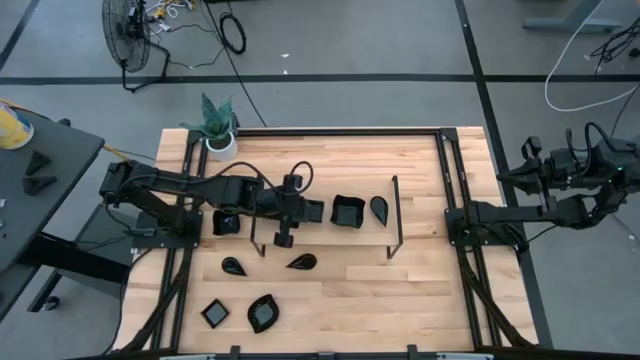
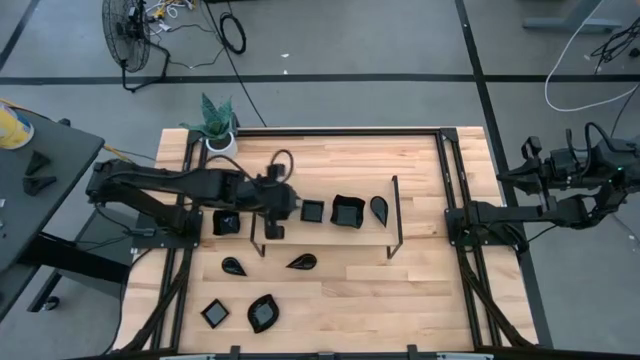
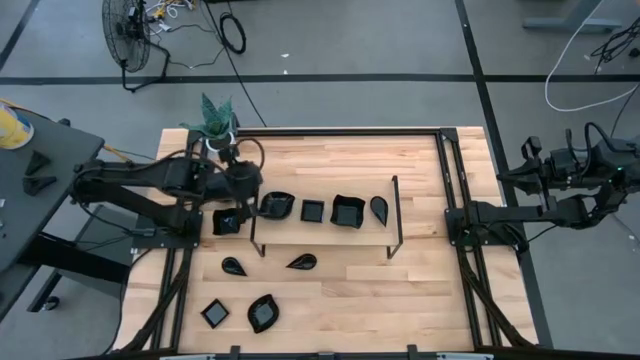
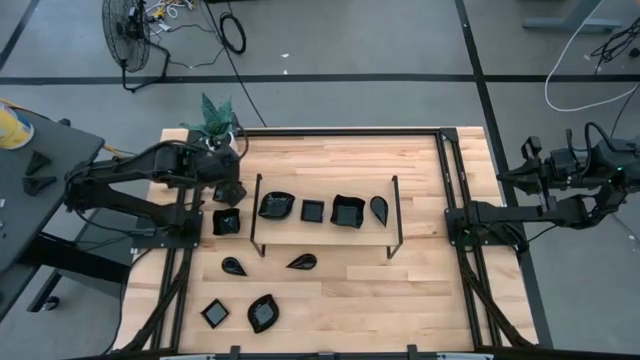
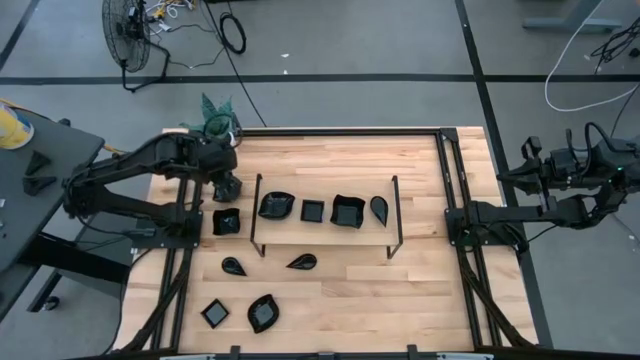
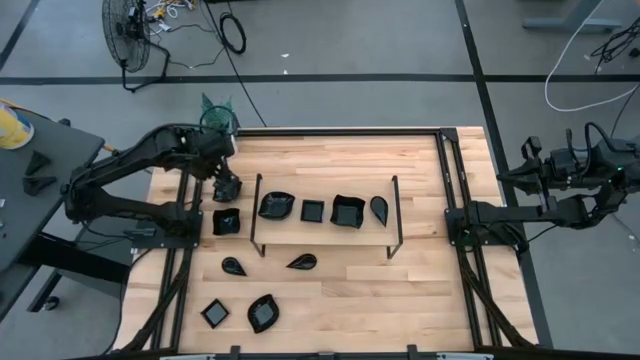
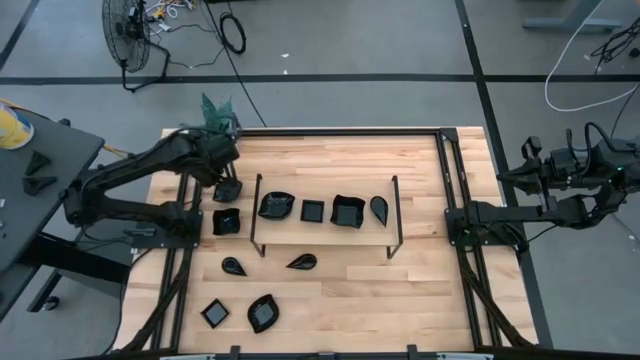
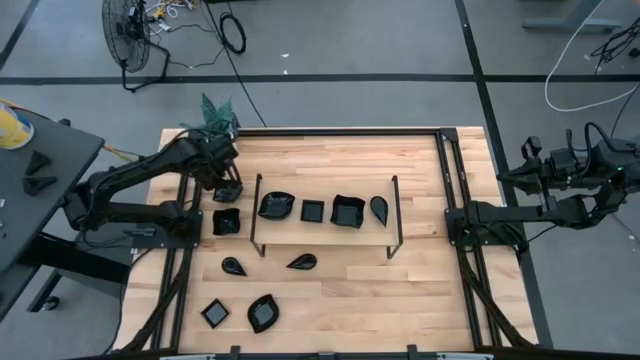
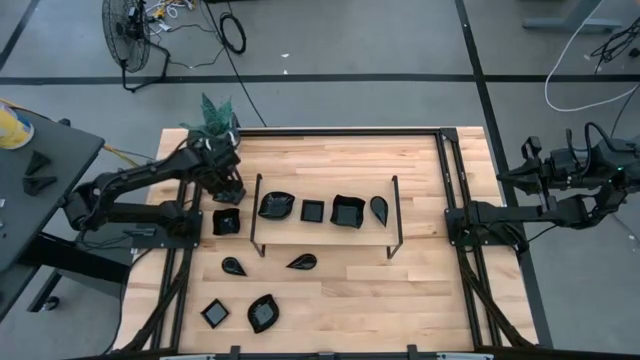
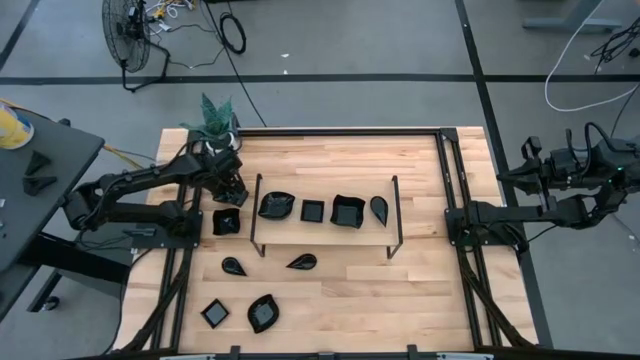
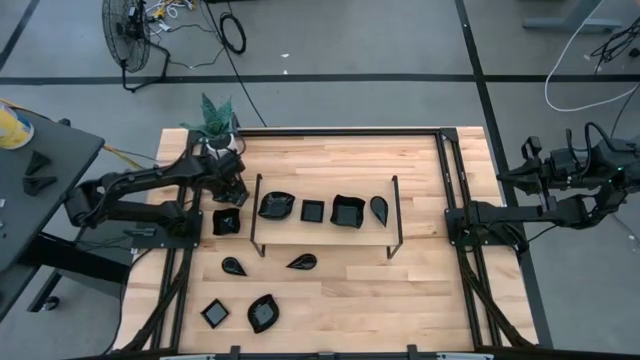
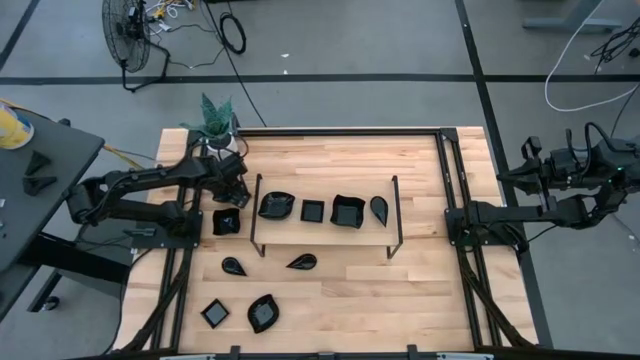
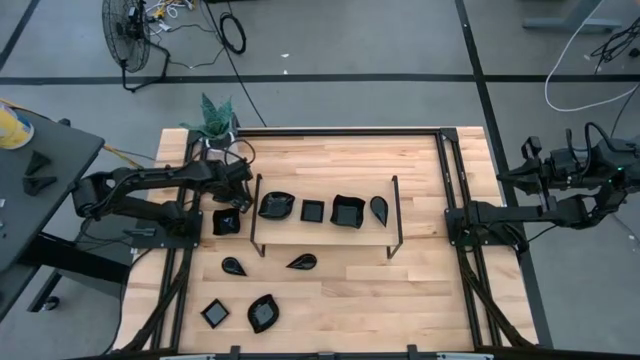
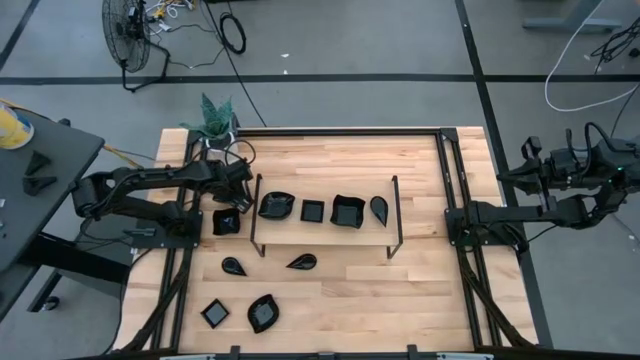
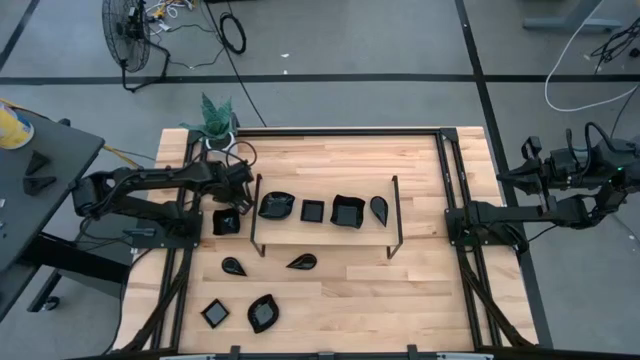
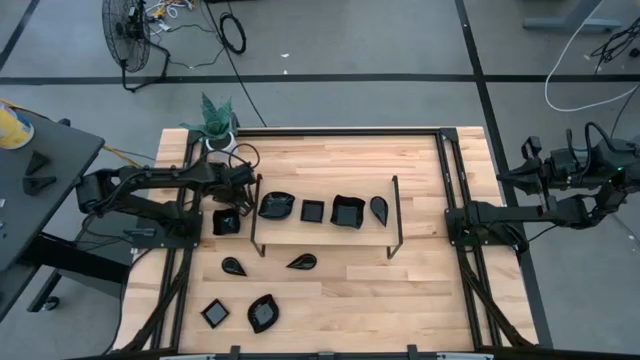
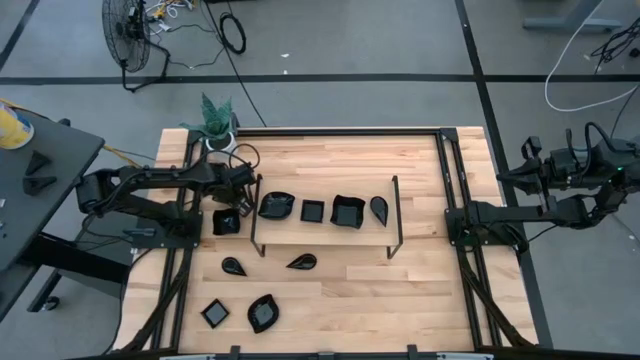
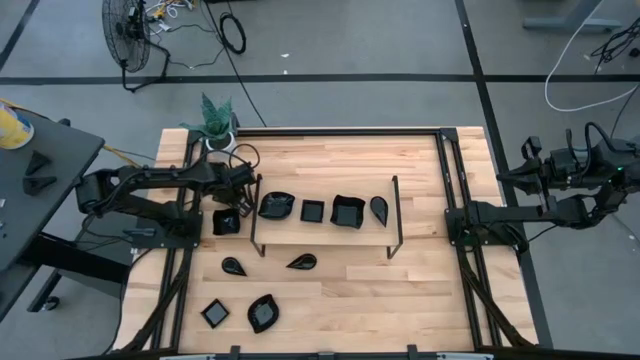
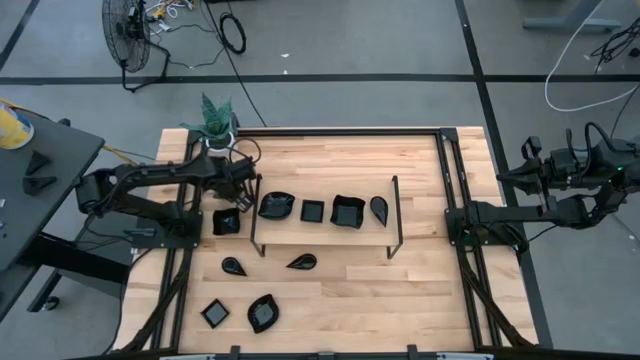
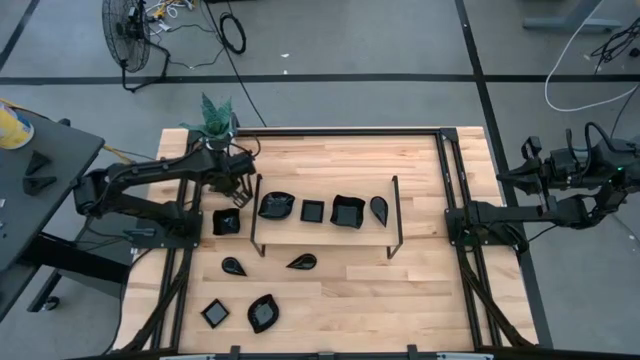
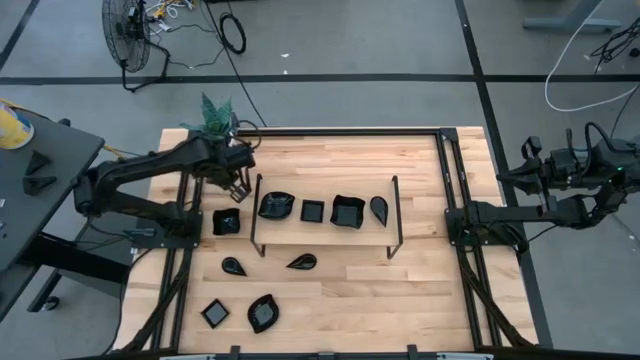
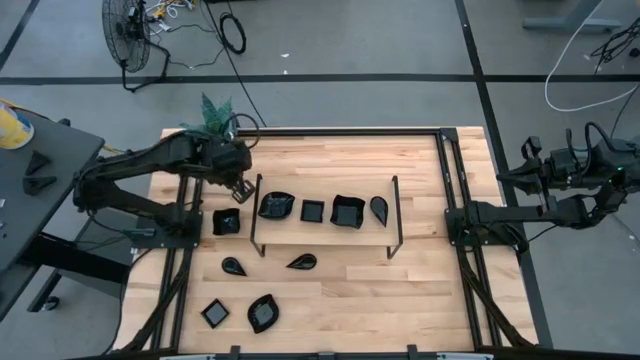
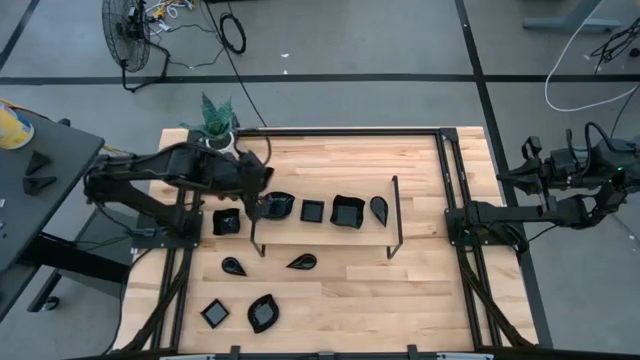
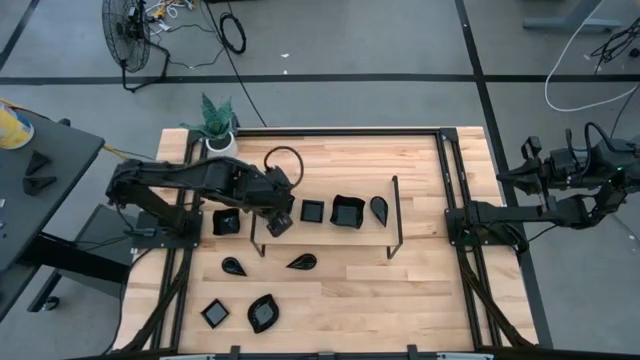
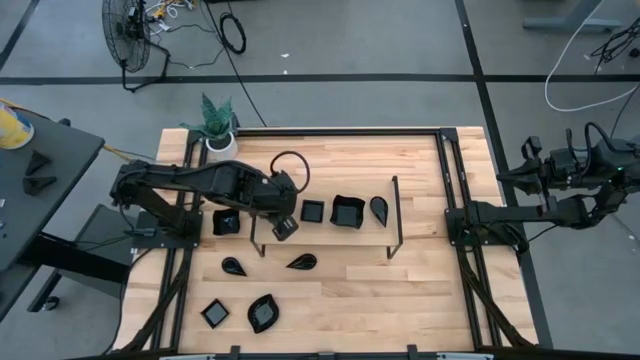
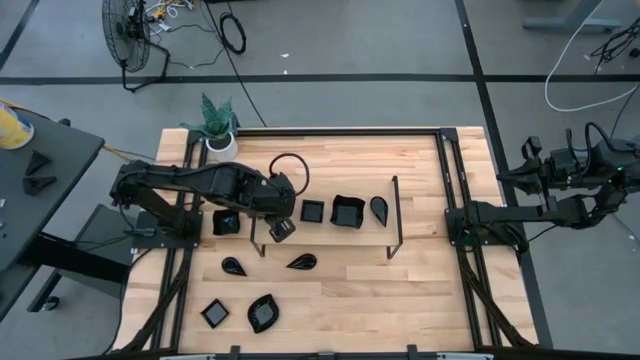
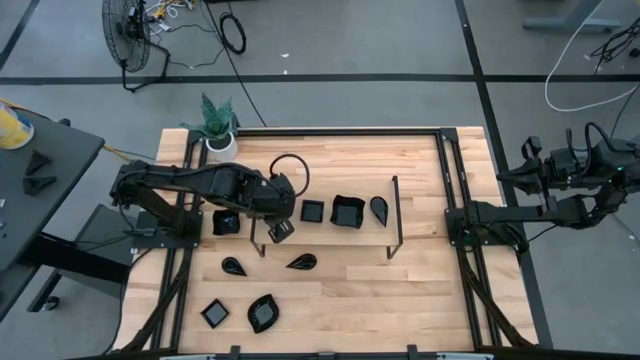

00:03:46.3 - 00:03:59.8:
Task: Pick & Place Mini shaped plates
Stack the leaf shaped plate on top of the leaf shaped plate on the shelf

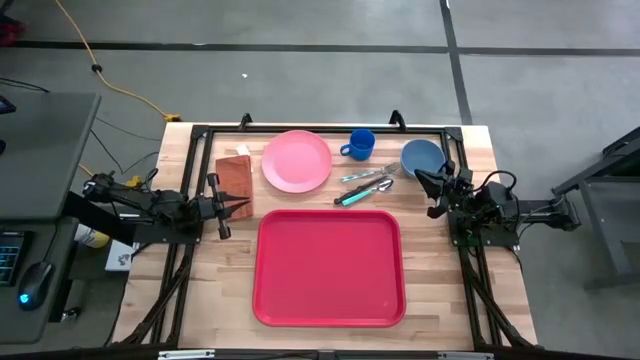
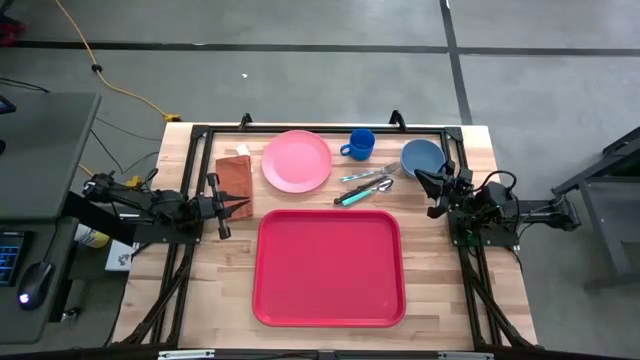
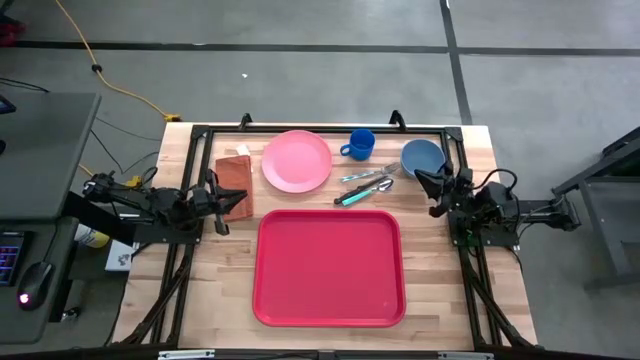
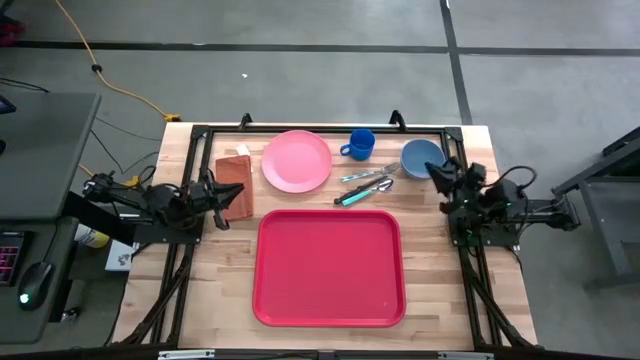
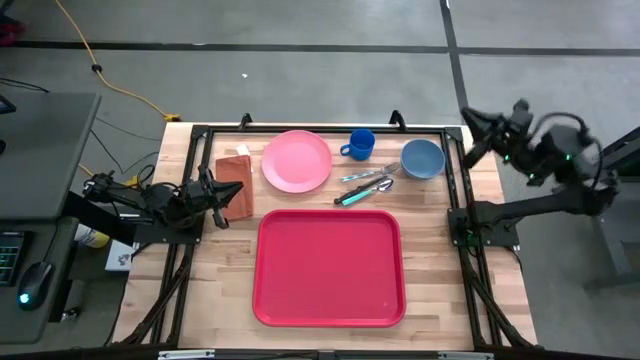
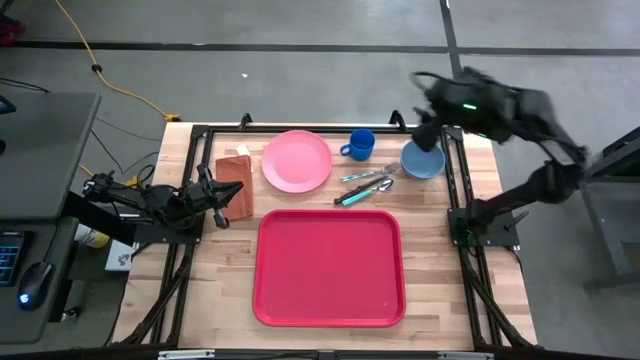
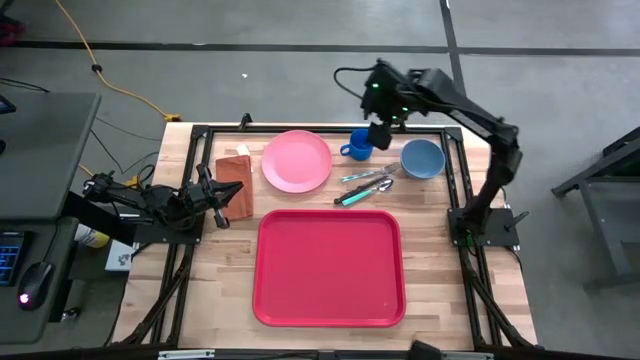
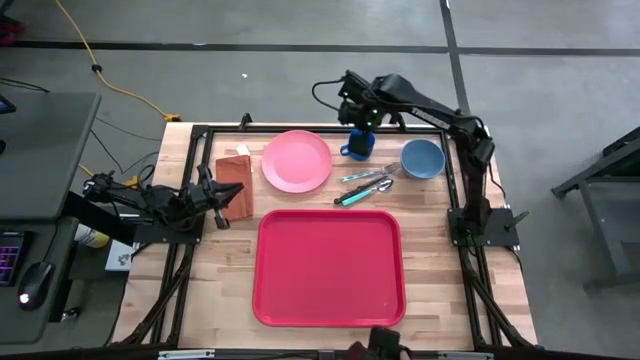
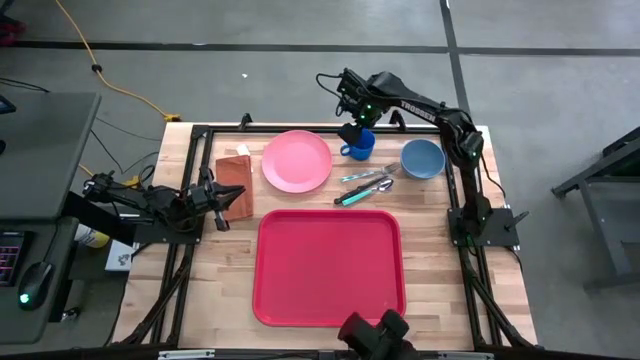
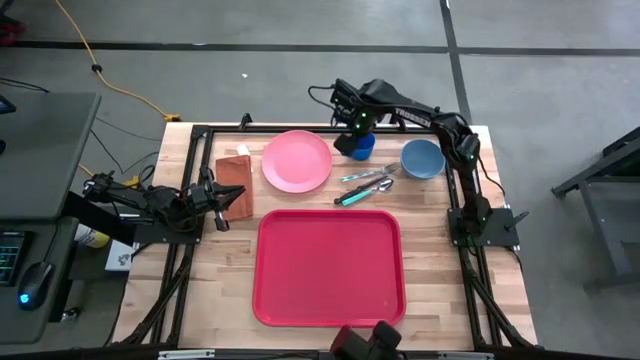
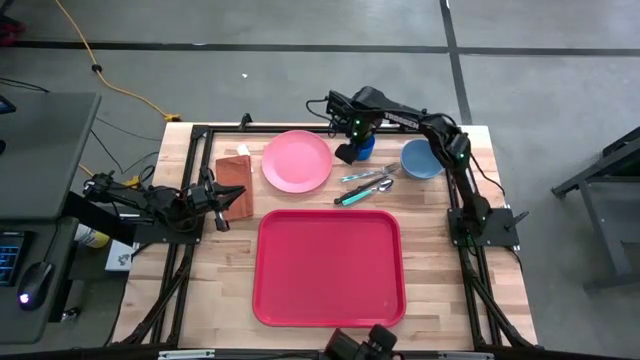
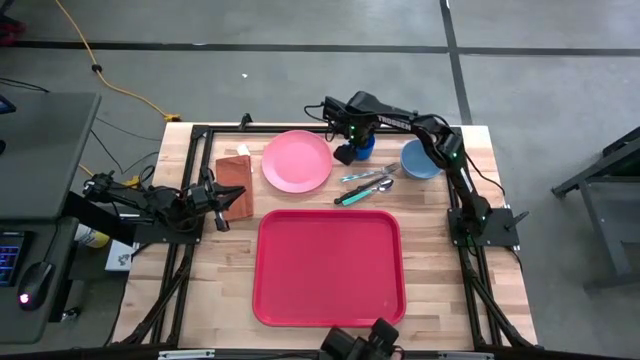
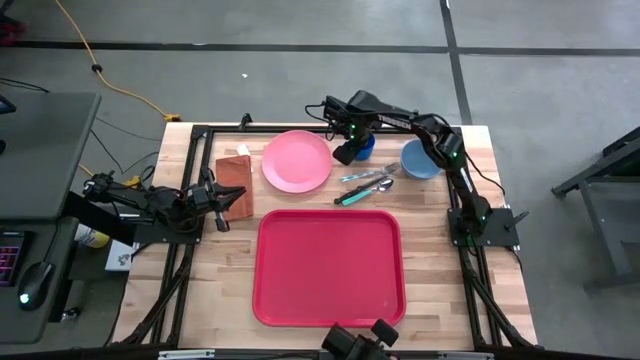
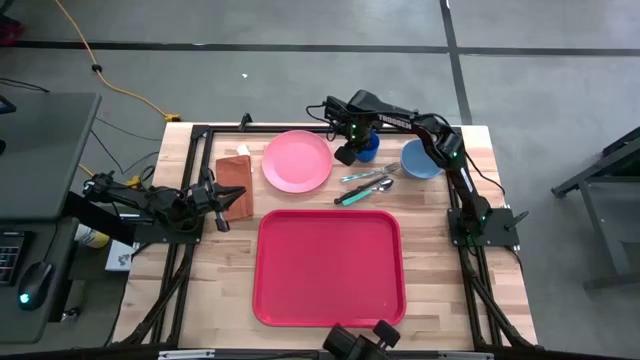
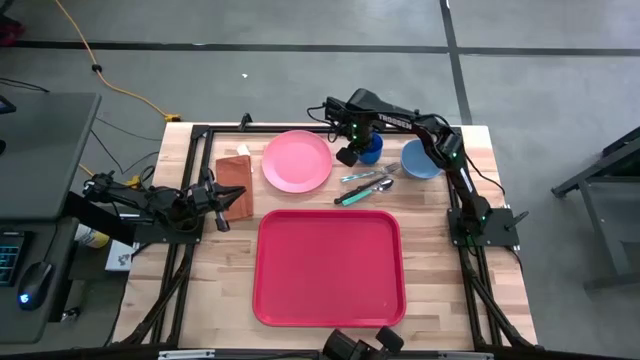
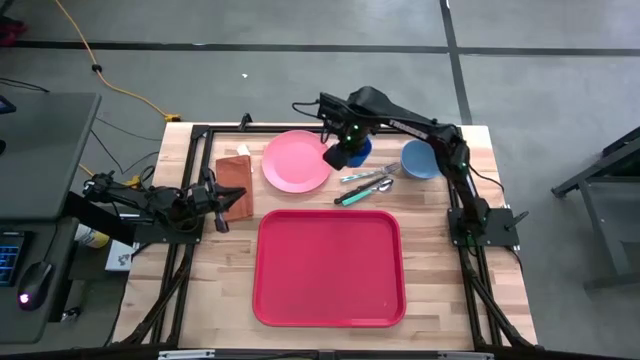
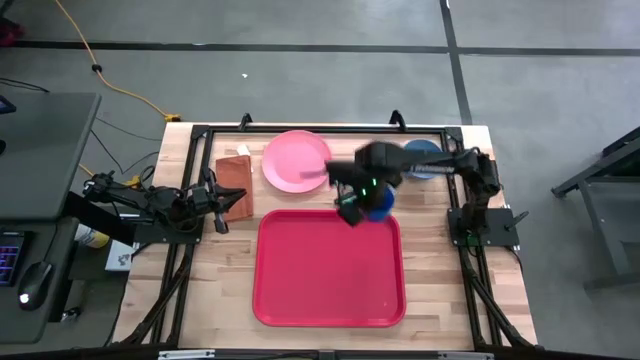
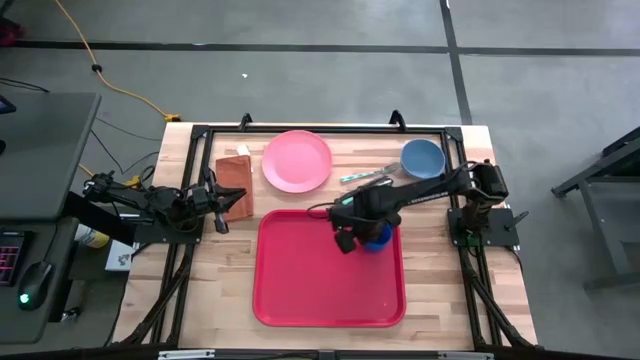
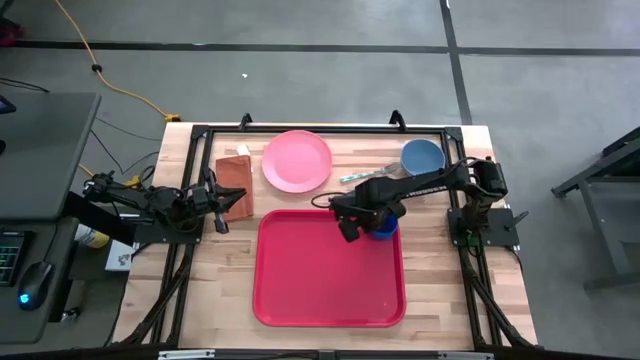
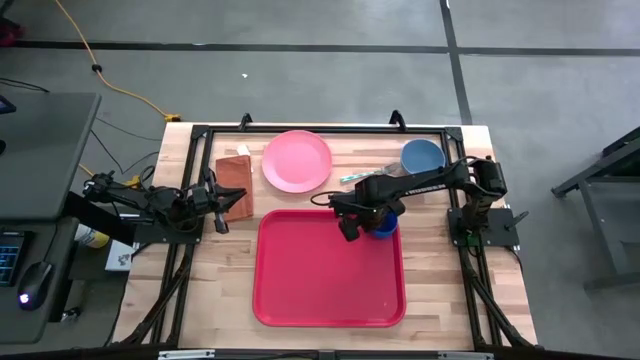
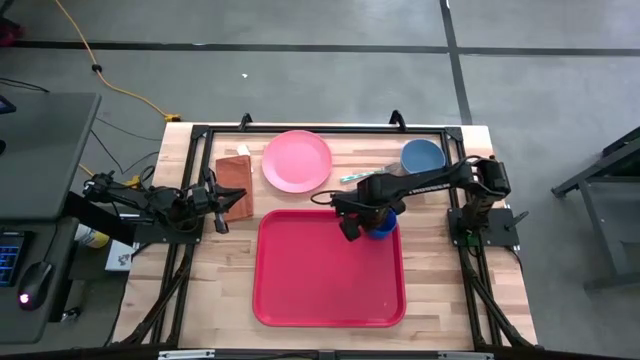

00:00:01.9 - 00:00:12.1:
Task: Set up tray
Put the blue mug on the red serving tray
